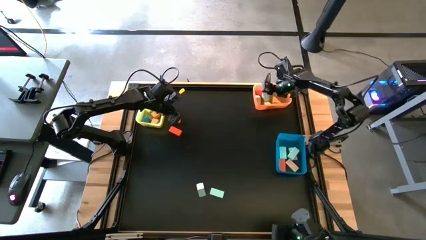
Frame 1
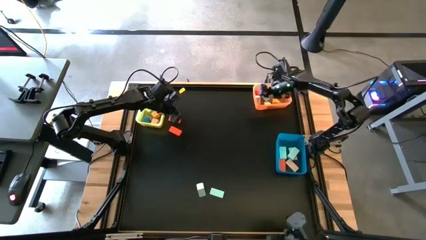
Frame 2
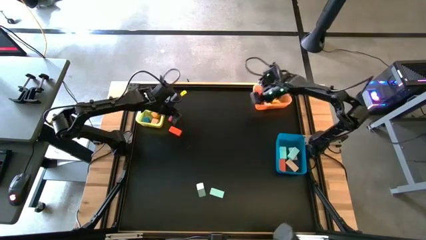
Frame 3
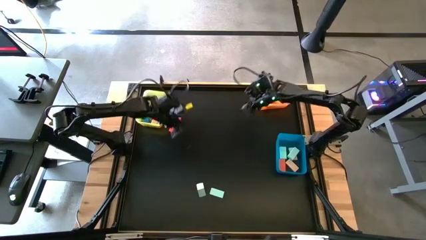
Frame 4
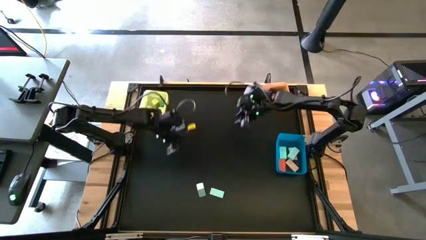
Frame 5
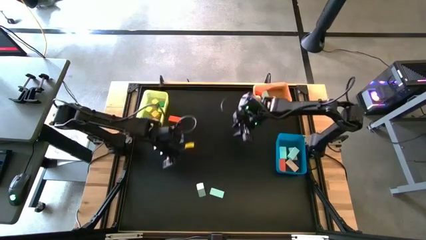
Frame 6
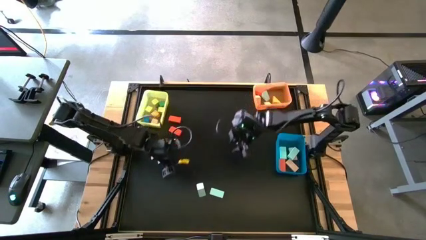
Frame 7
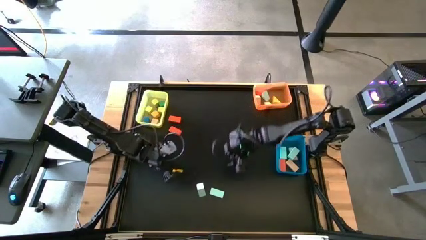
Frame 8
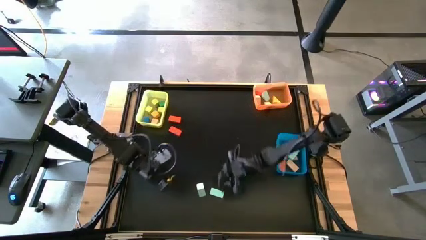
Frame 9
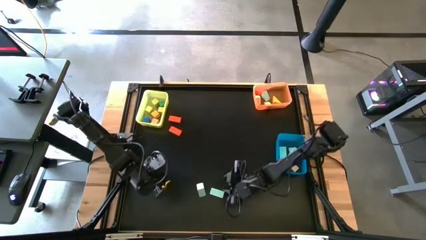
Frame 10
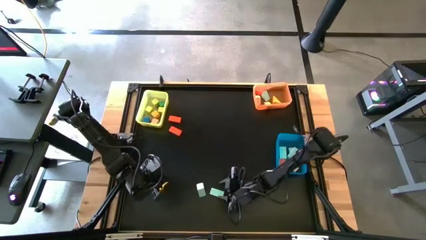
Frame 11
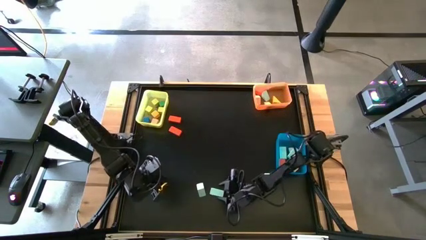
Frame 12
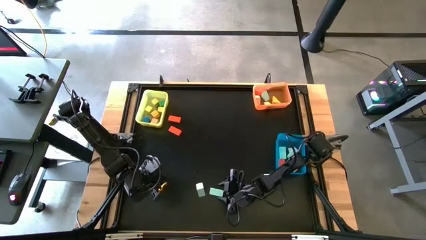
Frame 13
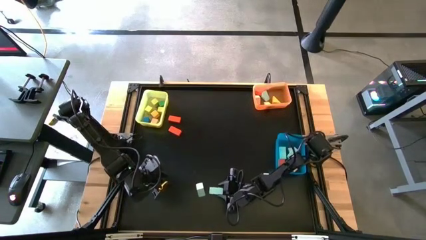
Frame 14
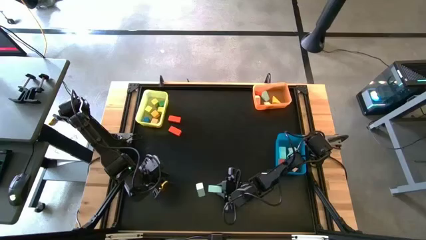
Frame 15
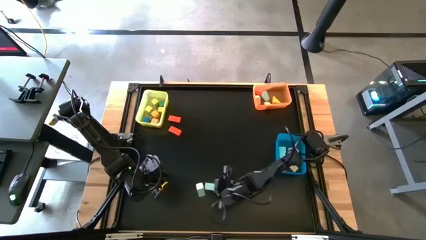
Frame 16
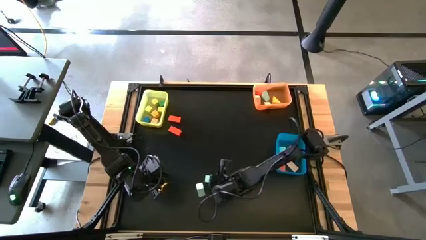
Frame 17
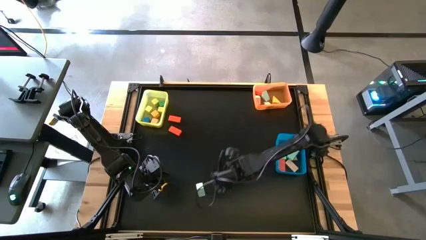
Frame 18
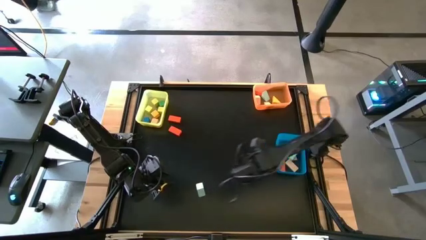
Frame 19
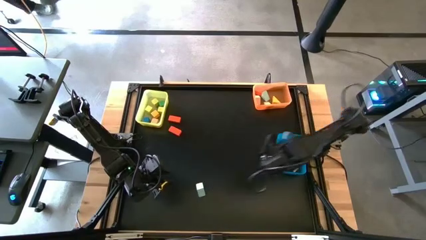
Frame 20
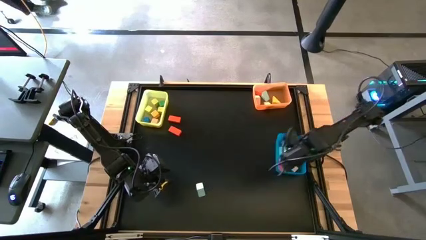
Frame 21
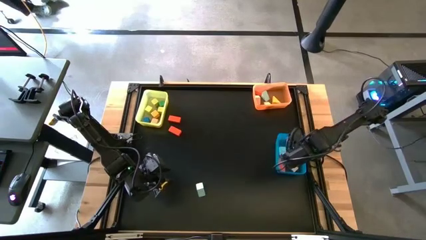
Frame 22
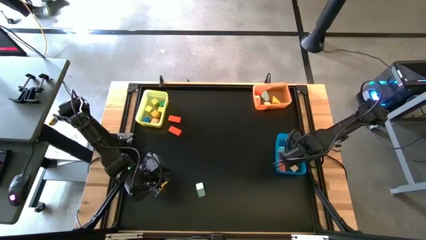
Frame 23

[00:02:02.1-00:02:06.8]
Task: Sort blocks by size
Put the blue rectangle block into the blue bin

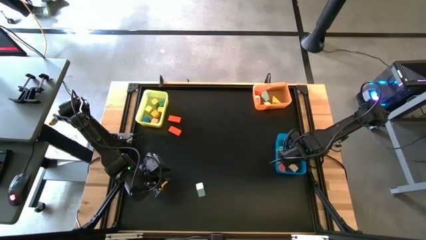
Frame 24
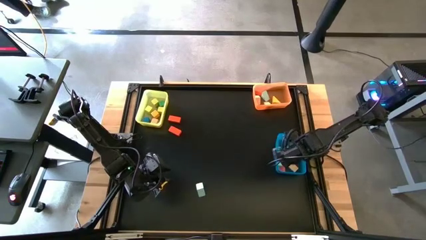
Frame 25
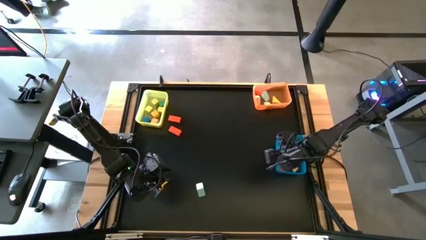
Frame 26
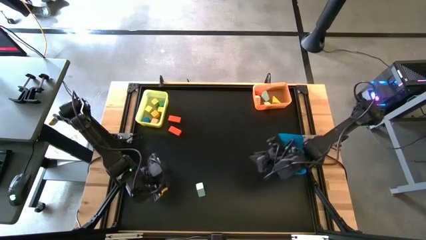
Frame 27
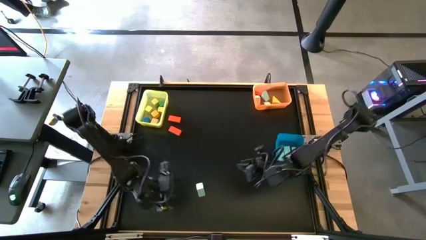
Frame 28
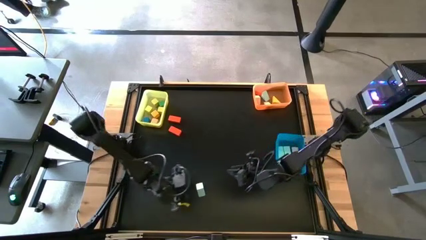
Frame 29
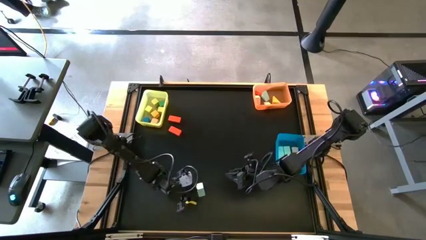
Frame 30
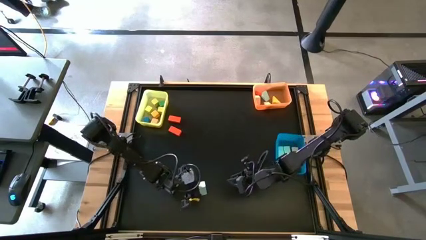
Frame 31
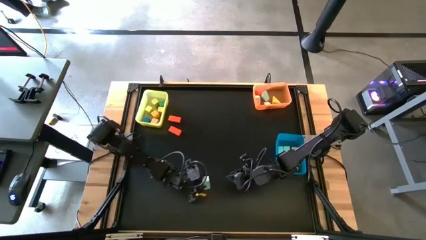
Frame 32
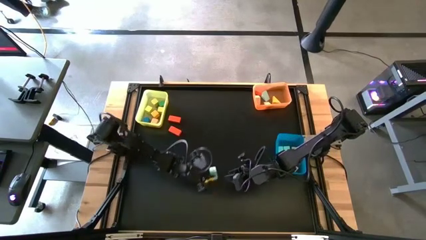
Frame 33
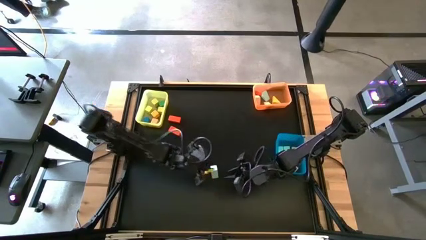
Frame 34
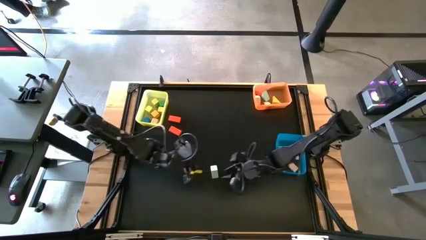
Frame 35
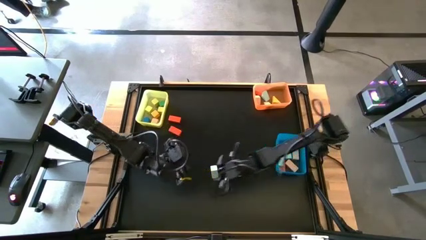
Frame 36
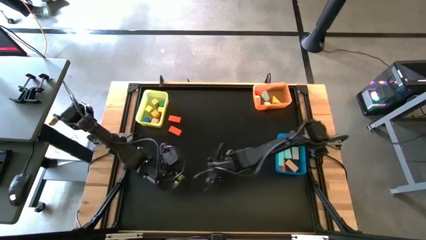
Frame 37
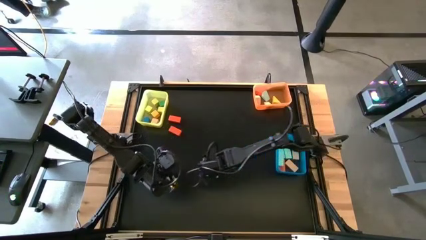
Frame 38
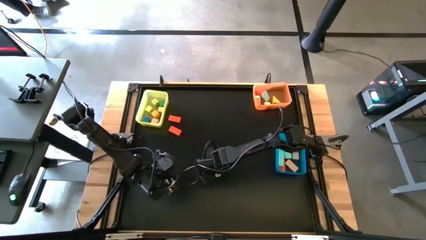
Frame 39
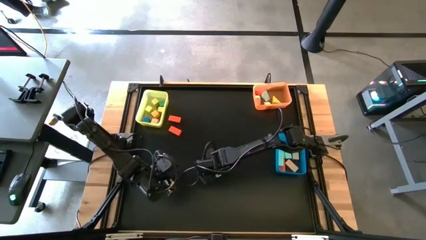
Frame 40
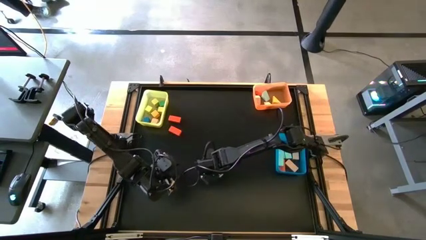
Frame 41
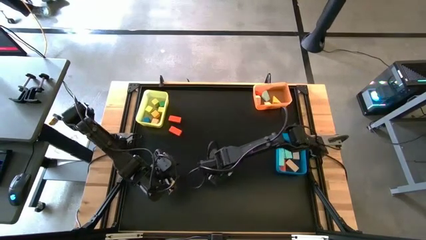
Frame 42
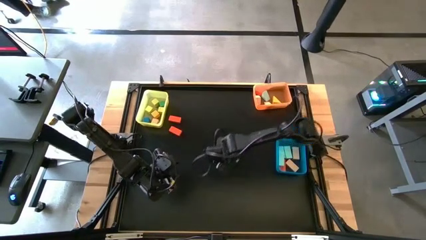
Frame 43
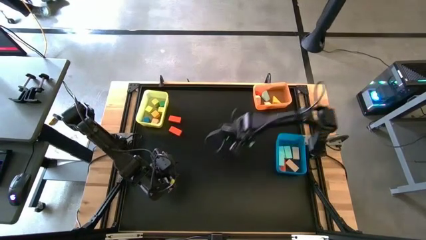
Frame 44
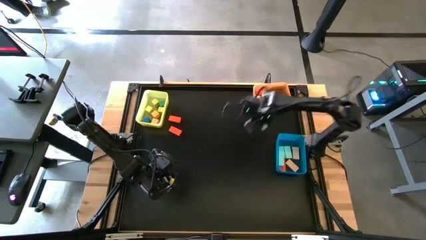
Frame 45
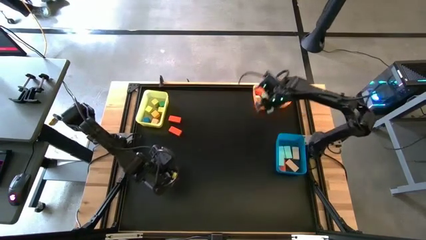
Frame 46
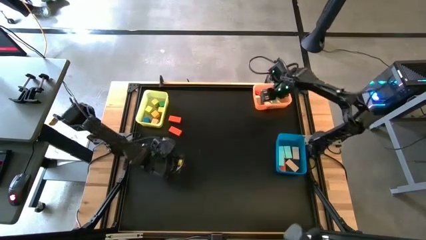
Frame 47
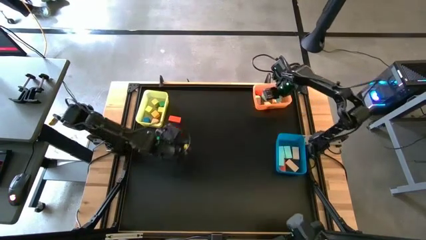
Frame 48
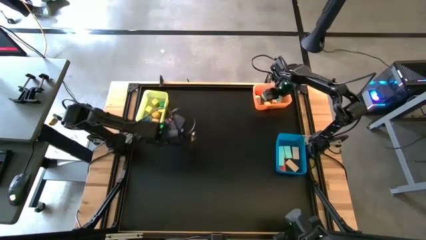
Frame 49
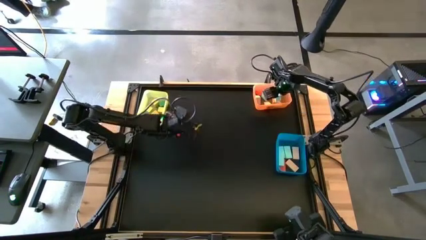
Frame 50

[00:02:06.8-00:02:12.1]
Put the blue triangle block into the orange bin

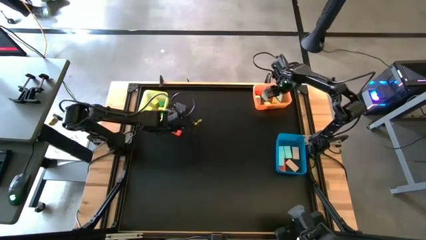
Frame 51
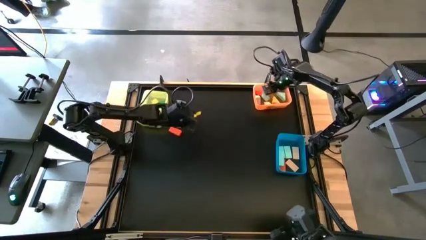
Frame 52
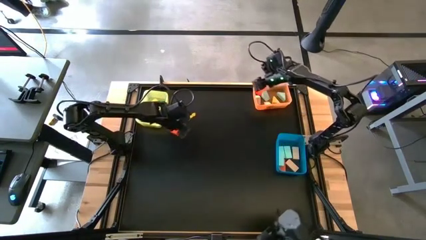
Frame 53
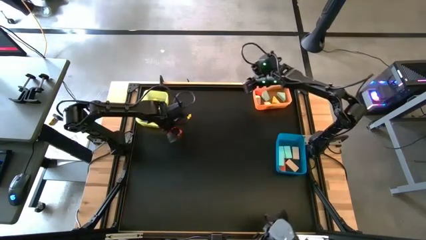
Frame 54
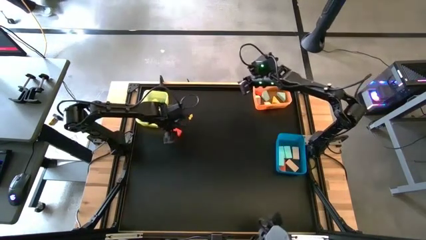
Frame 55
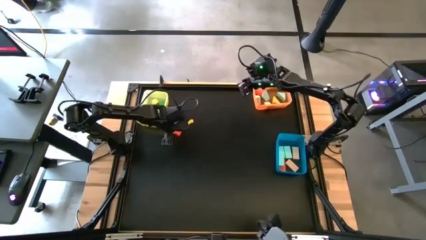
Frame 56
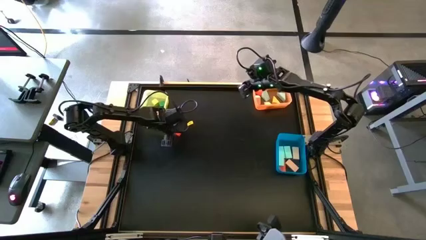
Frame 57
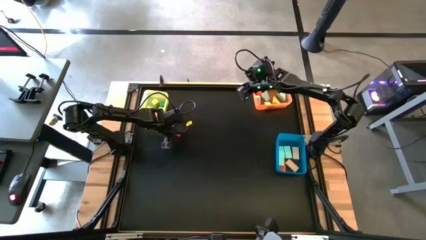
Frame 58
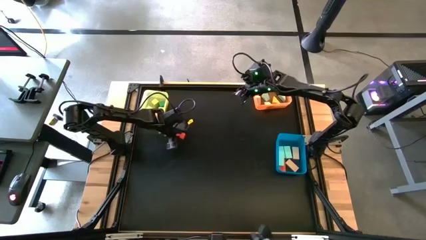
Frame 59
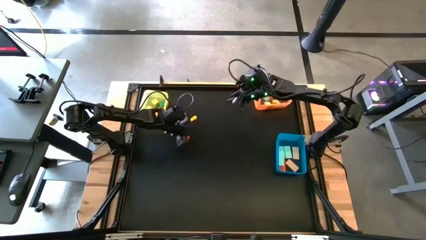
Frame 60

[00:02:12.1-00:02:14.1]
Put the orange rectangle block into the blue bin

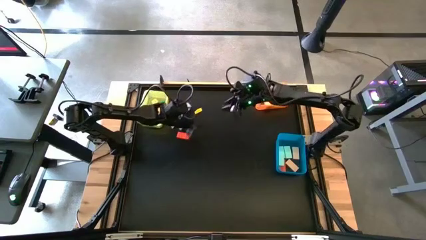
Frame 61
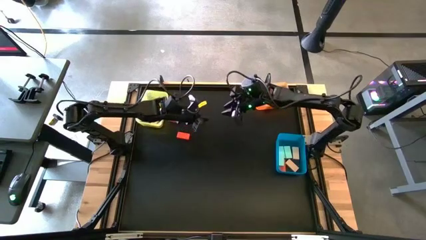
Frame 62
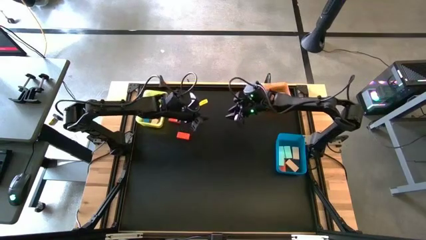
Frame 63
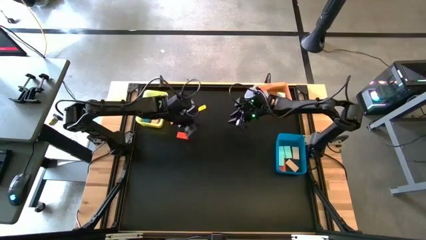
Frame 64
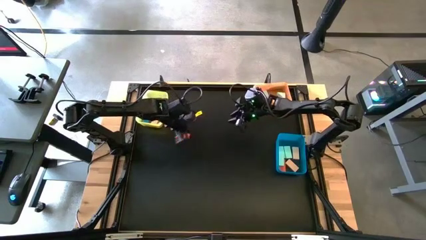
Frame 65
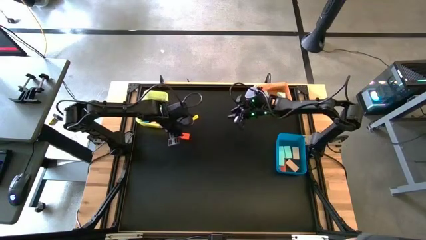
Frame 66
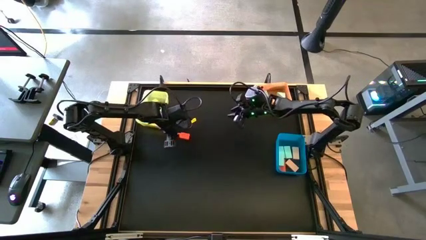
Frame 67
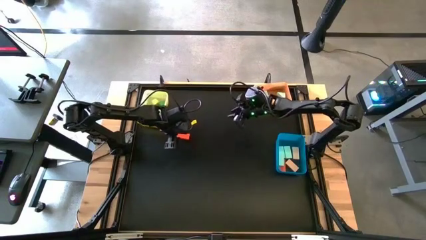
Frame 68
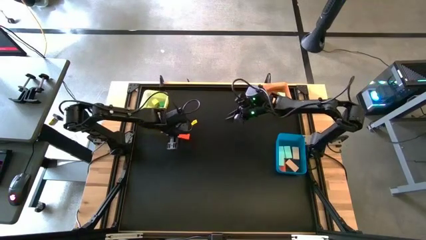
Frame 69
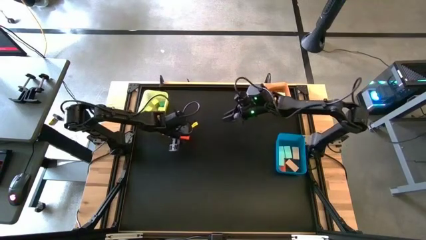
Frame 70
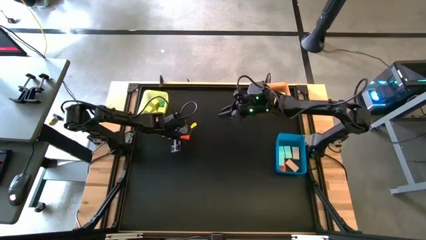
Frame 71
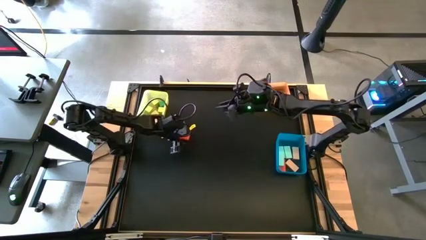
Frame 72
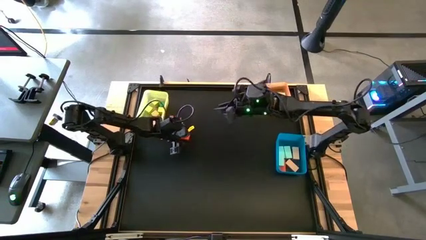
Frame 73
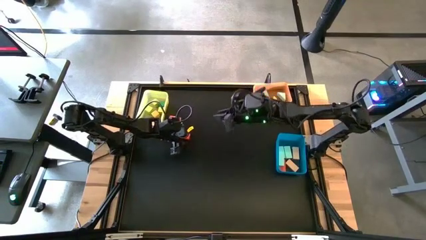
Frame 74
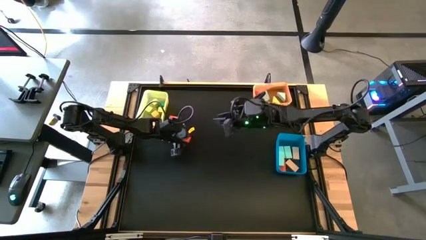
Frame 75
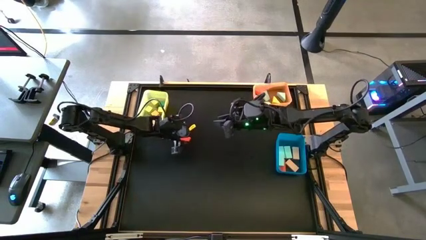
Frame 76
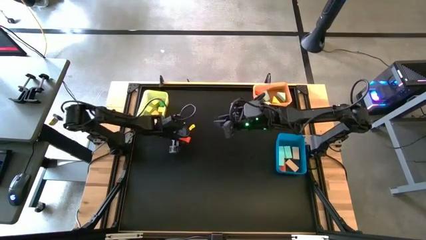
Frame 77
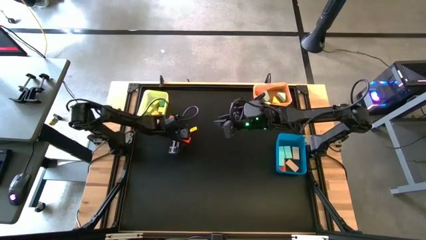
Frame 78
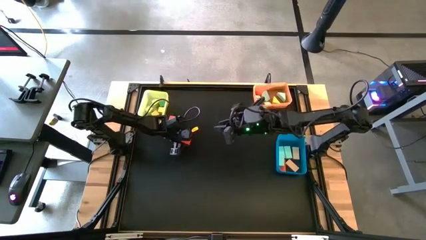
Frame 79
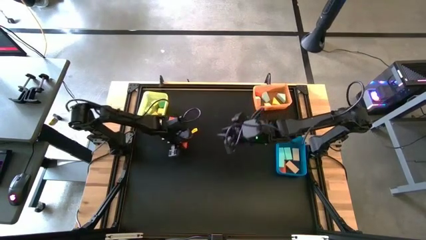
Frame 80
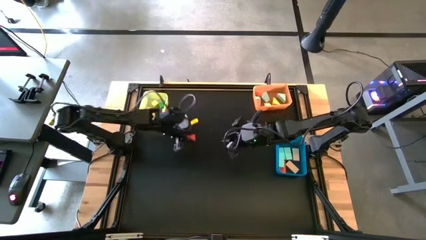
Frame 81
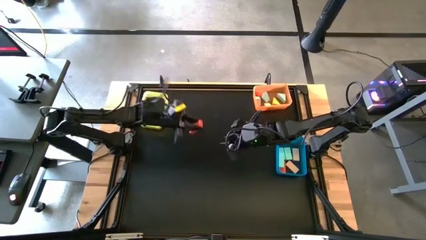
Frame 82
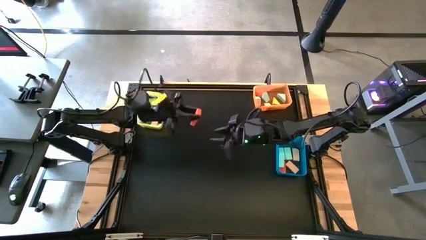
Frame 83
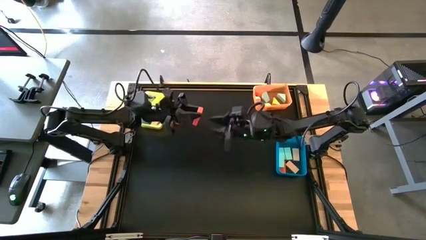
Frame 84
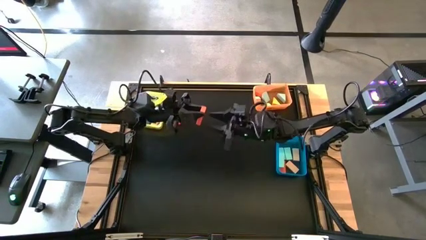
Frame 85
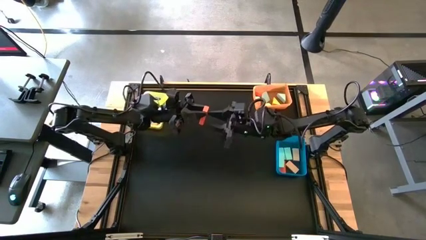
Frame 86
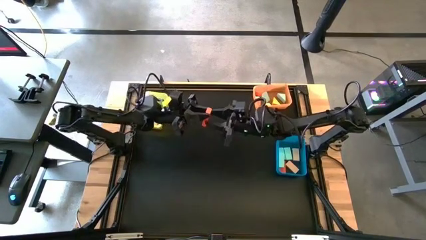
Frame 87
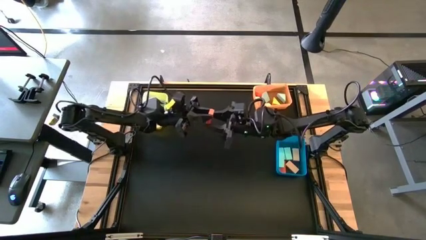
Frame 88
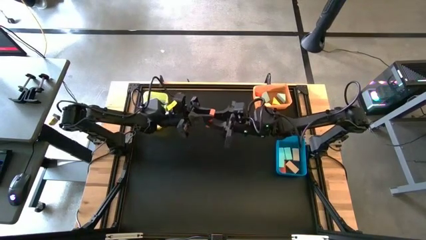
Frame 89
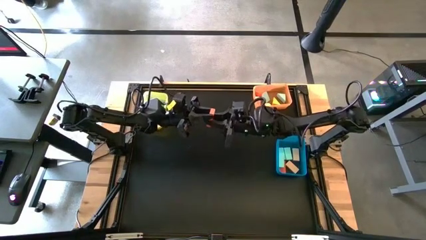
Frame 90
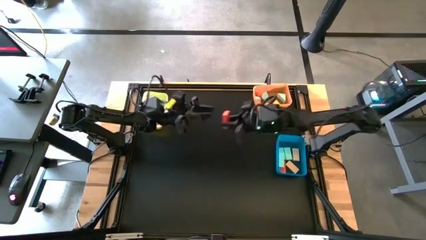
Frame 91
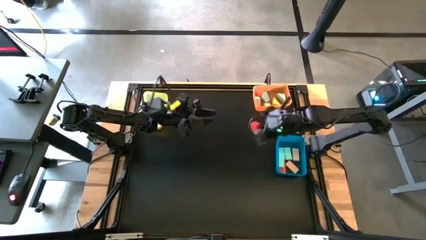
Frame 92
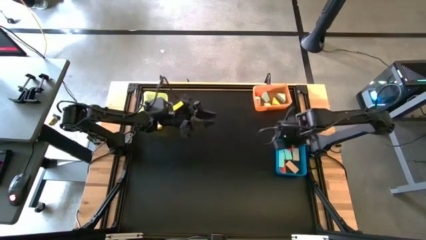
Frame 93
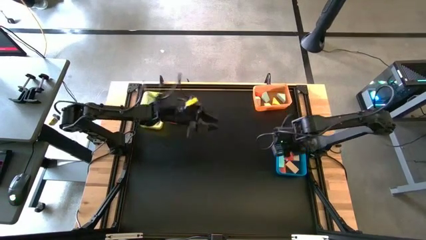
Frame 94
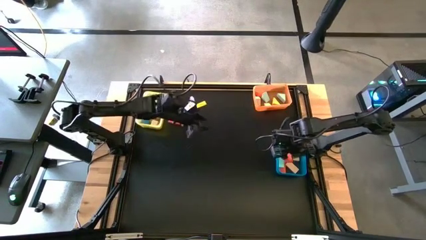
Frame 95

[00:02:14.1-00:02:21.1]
Put the orange rectangle block into the blue bin
